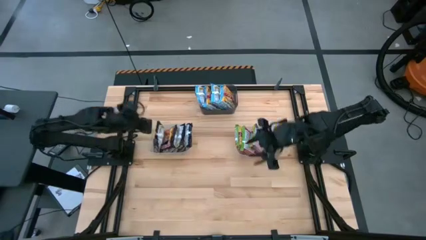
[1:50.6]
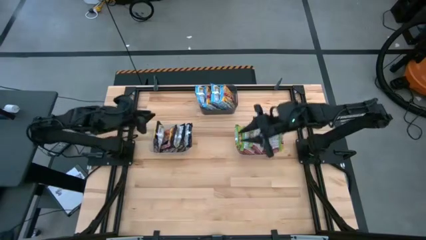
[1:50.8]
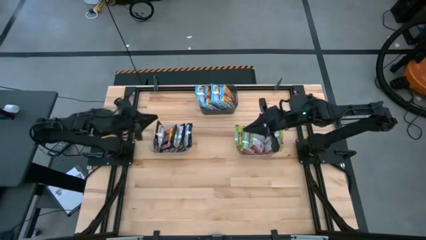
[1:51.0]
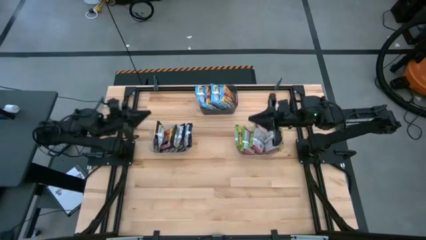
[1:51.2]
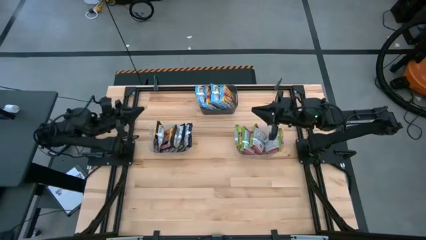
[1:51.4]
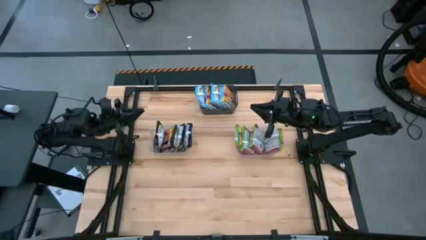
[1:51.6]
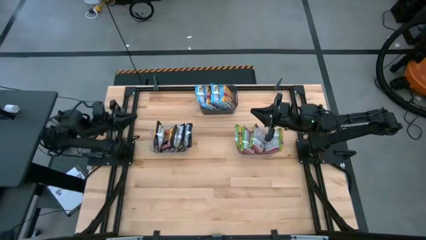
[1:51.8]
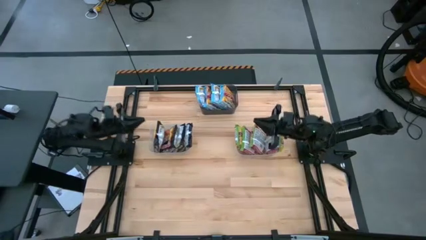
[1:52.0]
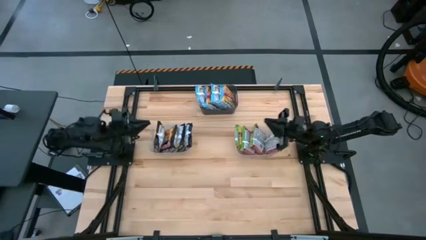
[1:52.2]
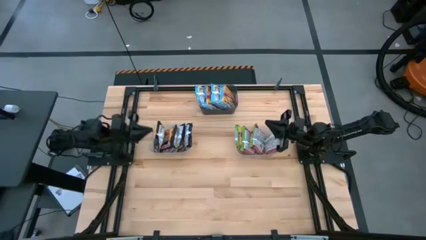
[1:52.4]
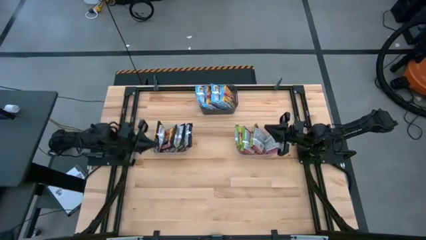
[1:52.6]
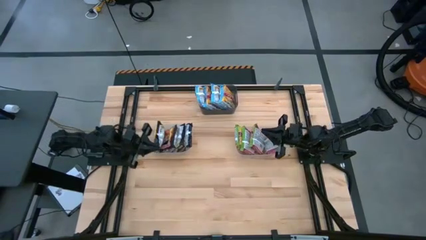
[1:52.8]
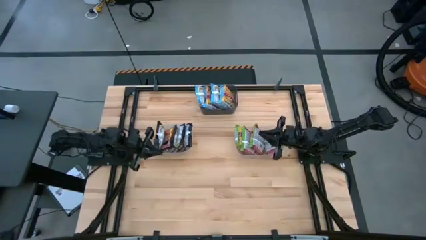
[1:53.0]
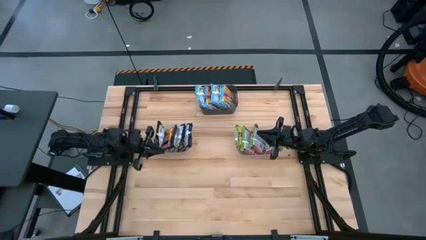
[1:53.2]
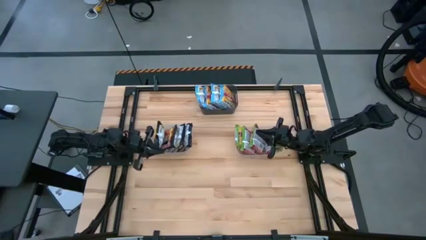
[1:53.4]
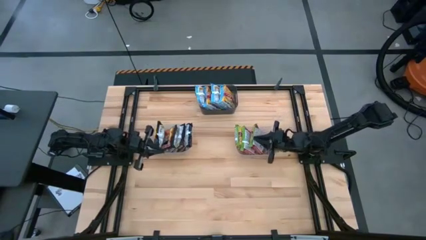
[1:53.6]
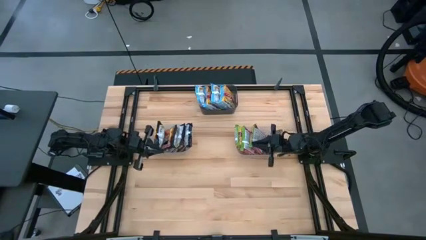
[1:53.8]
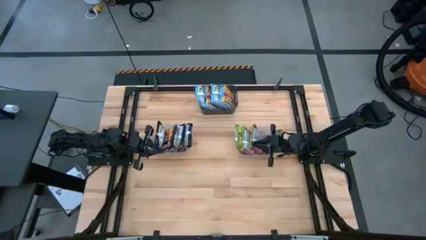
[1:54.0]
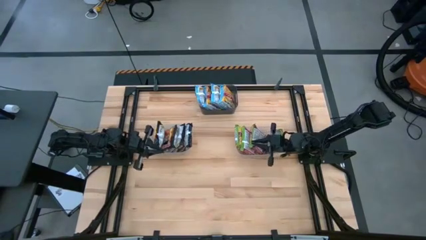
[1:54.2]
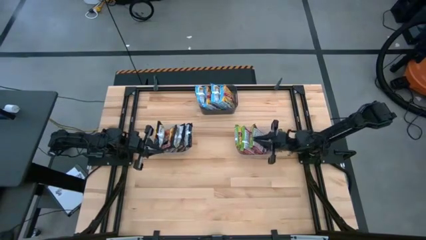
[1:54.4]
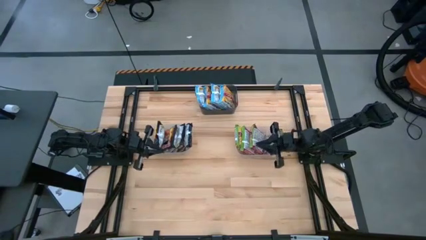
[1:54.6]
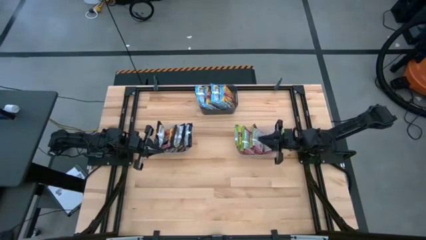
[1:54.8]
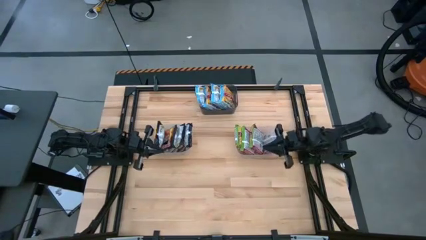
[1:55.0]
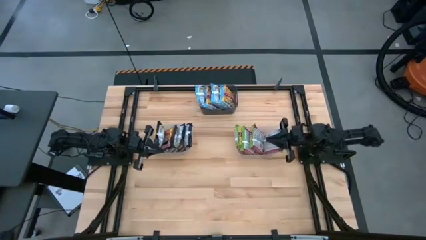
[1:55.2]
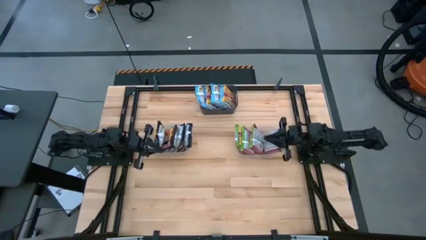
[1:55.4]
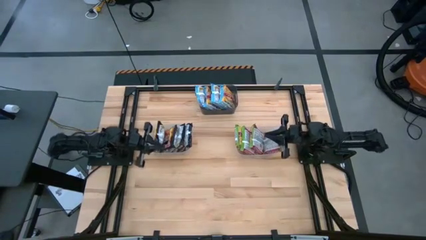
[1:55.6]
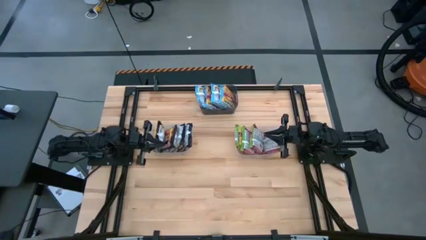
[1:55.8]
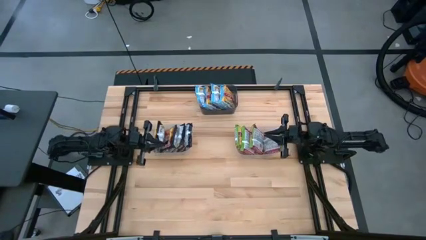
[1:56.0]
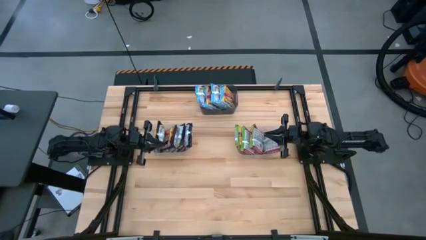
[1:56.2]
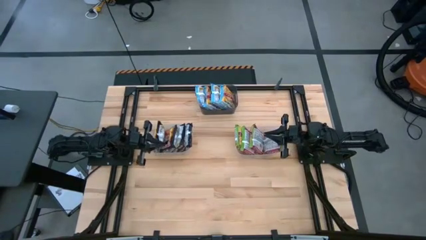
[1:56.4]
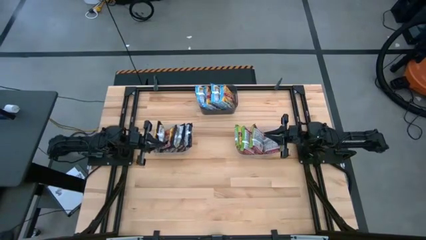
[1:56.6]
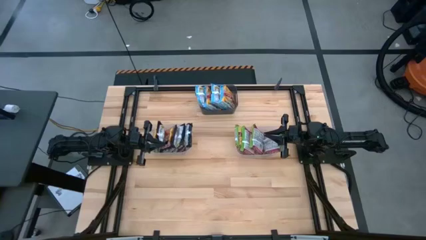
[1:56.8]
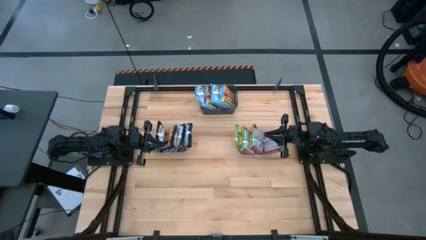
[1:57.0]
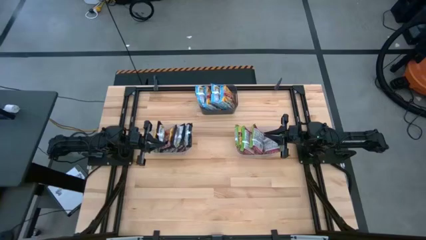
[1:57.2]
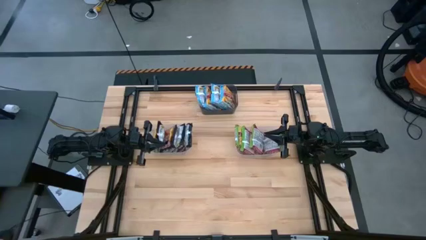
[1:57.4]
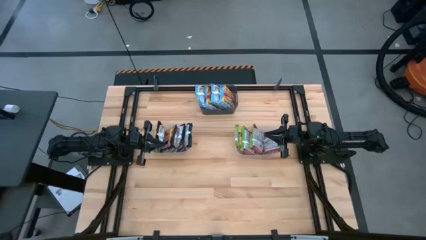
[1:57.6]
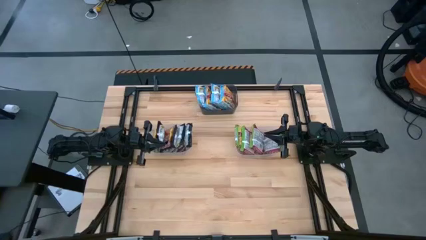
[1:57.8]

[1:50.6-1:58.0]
Task: Sort Maruchan noodles
Return to Home Position

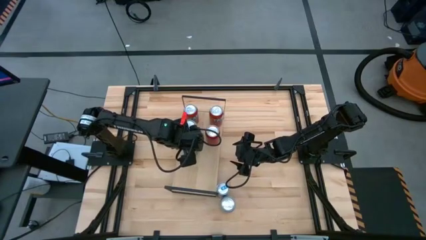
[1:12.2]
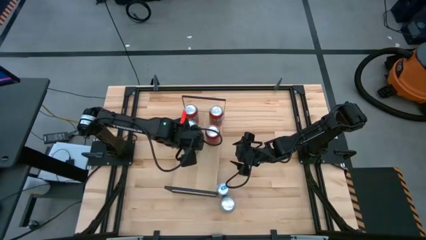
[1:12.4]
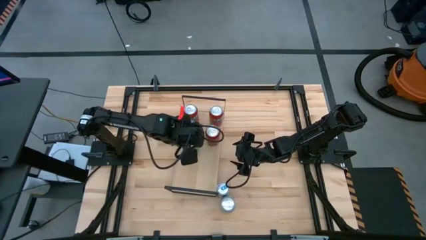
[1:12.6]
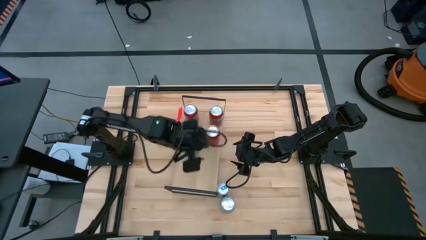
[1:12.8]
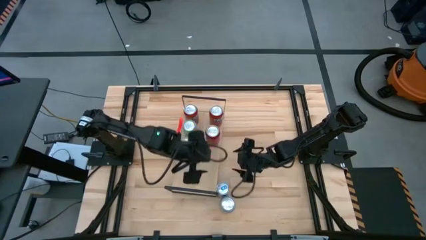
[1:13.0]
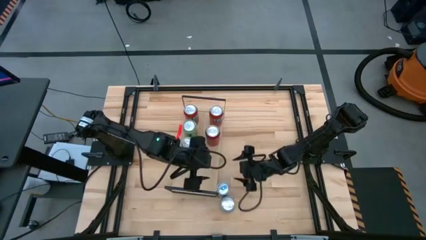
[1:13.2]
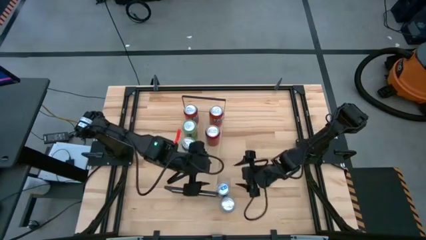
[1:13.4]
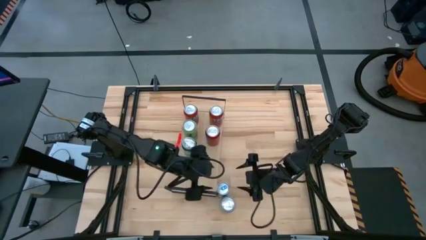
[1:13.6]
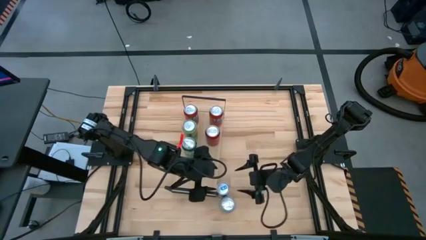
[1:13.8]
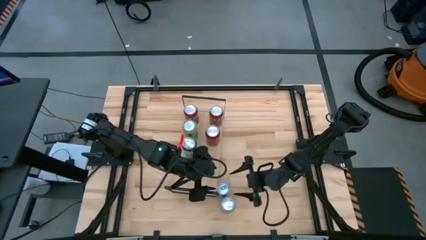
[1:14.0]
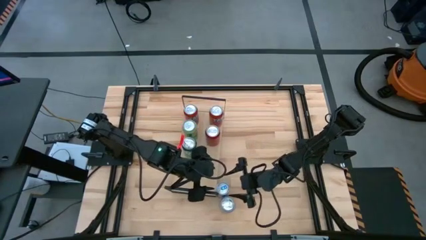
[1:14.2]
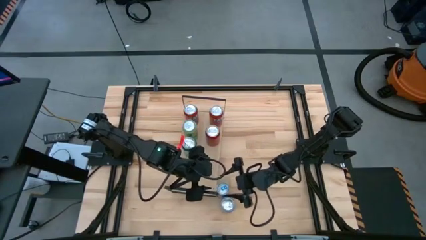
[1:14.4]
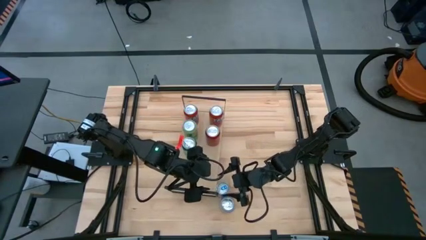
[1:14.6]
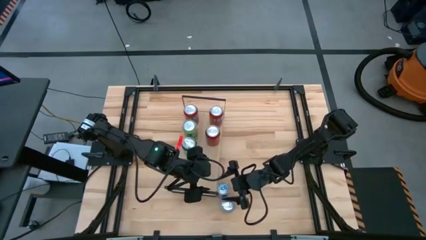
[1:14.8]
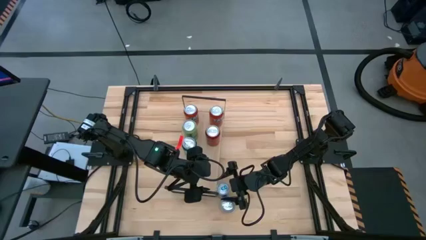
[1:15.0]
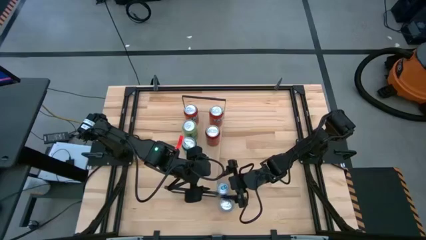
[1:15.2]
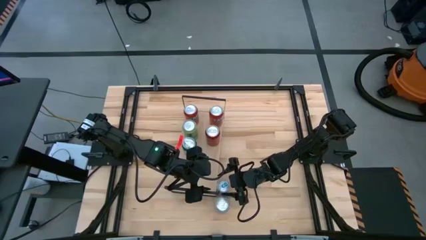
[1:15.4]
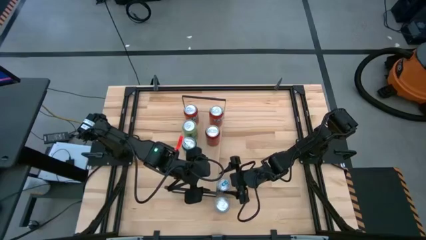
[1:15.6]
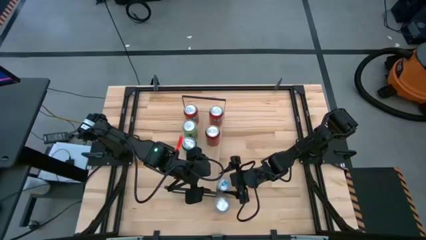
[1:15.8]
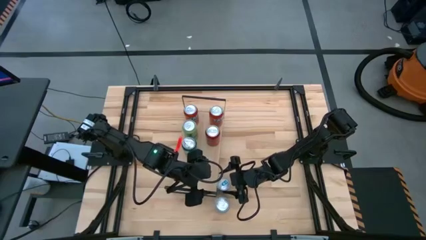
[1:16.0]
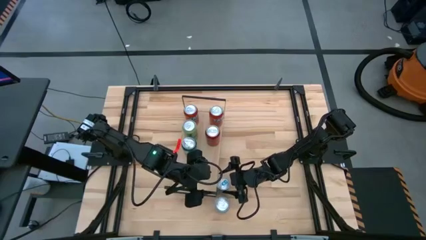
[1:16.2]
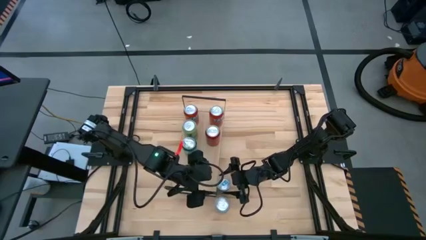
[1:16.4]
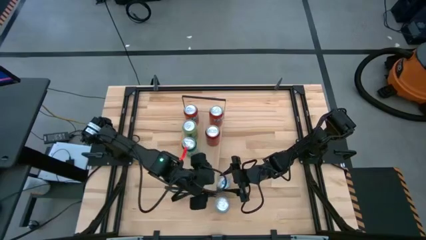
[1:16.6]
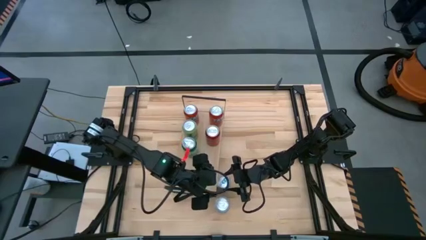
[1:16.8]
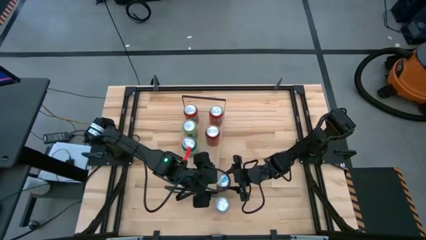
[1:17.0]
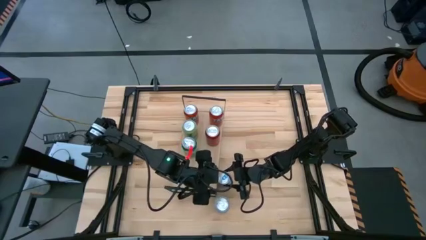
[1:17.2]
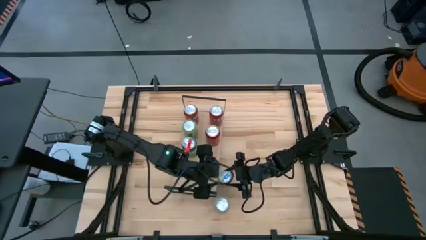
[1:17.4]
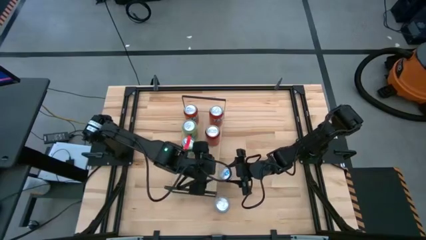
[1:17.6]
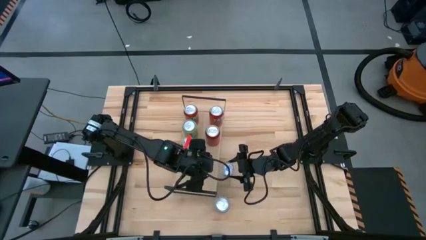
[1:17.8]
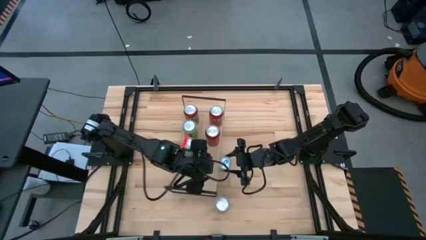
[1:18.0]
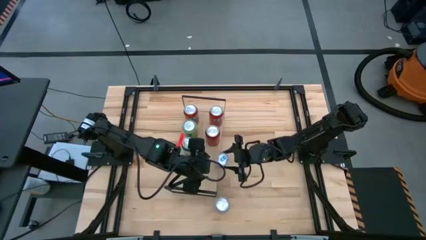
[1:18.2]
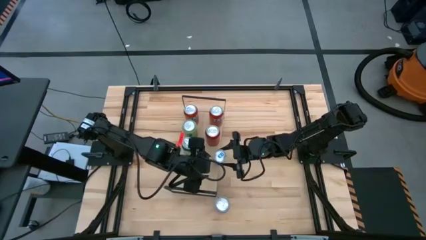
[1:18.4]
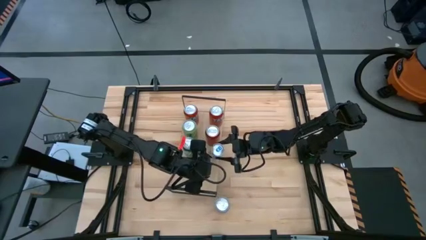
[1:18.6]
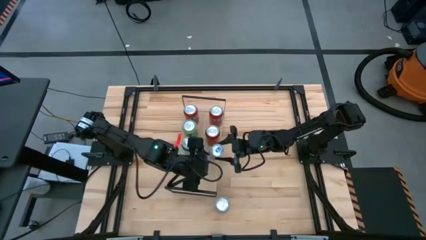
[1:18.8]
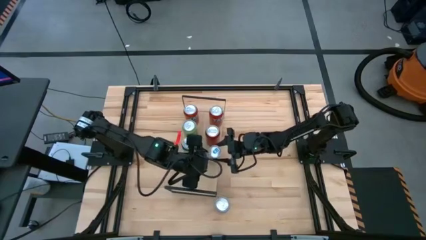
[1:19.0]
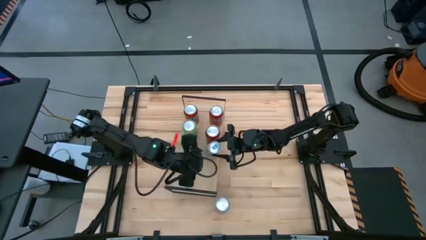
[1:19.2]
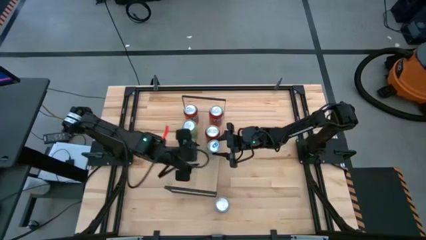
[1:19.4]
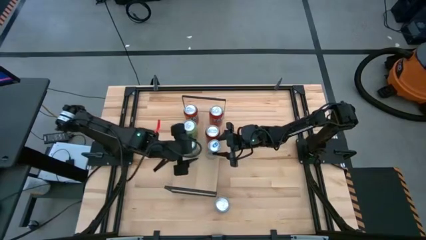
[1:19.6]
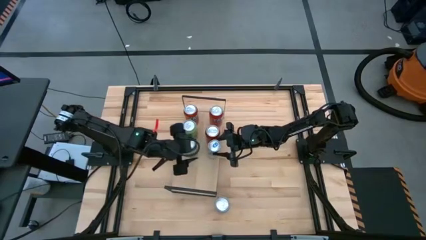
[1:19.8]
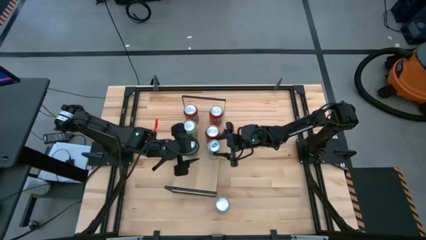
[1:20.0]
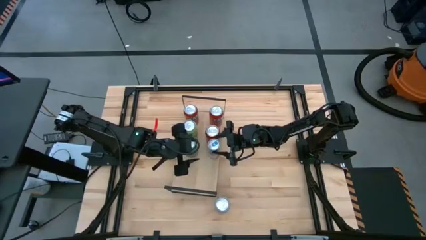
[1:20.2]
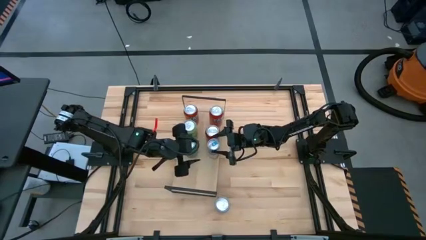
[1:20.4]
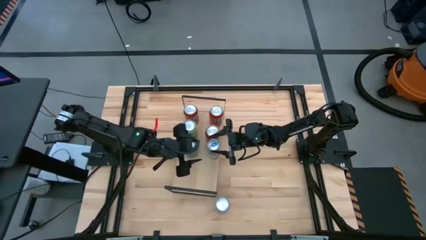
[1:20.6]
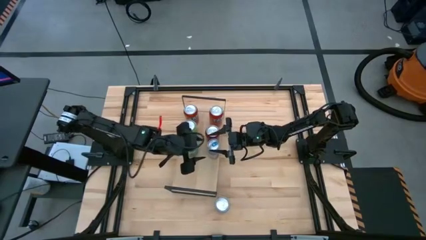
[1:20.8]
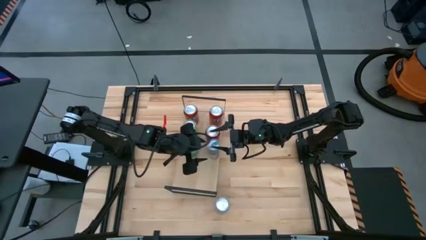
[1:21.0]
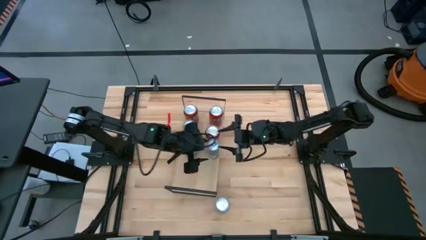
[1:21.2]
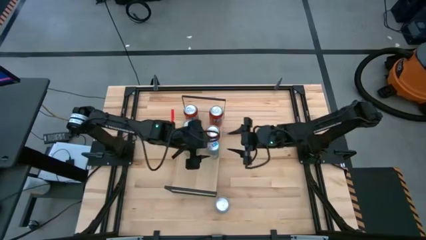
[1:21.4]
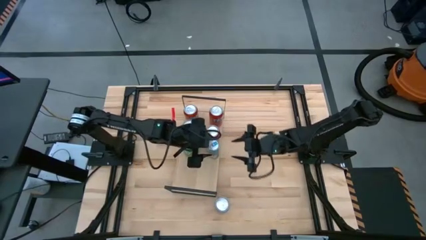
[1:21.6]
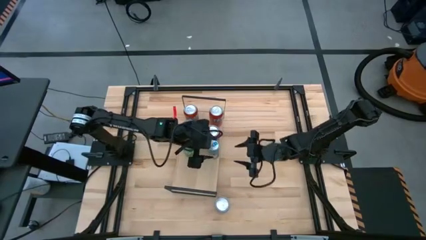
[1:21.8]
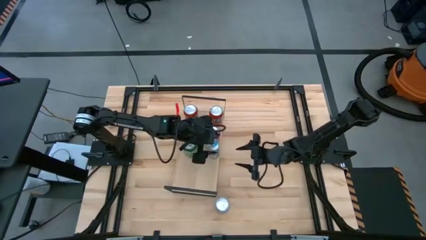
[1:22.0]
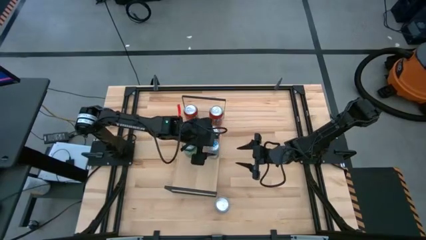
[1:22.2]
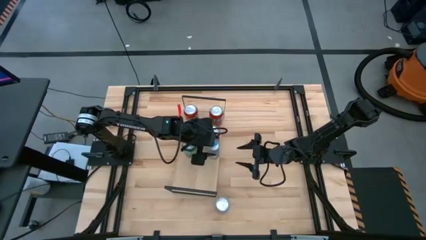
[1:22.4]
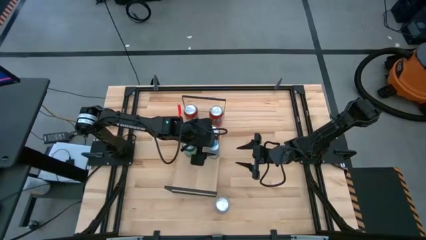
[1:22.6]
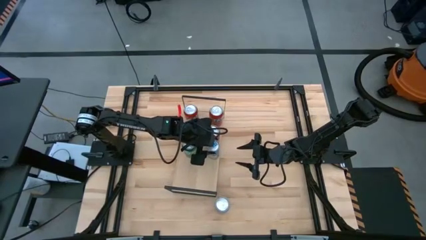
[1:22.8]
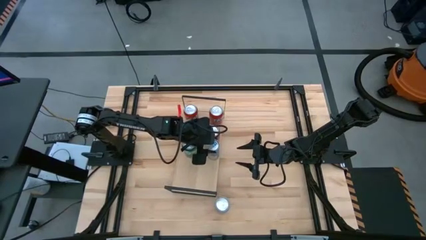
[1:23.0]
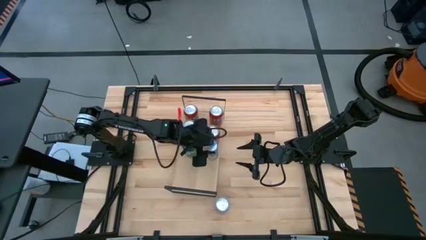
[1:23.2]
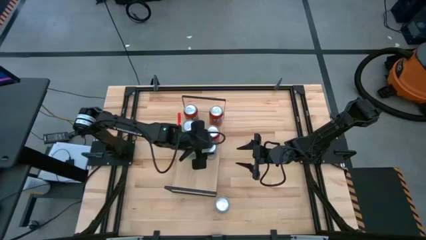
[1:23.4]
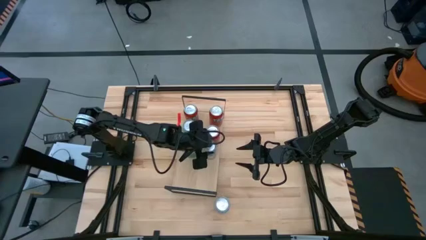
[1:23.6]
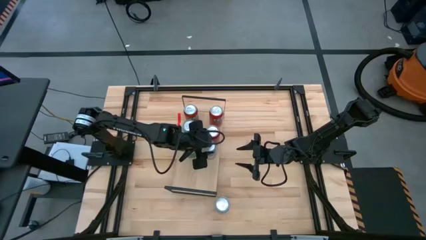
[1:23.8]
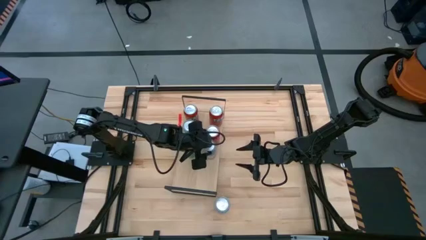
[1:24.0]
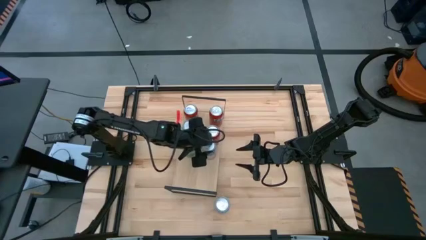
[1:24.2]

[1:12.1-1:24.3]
Task: Place canned beverage on shelf
Put the blue soda can on the shelf
